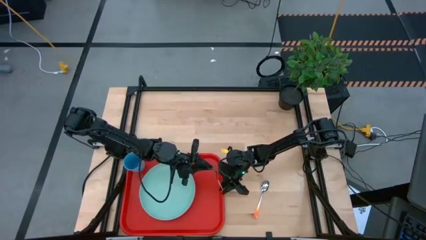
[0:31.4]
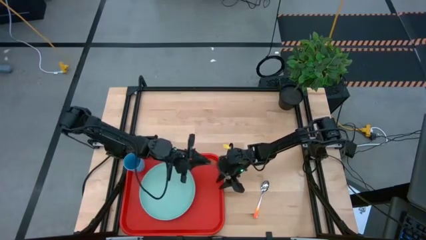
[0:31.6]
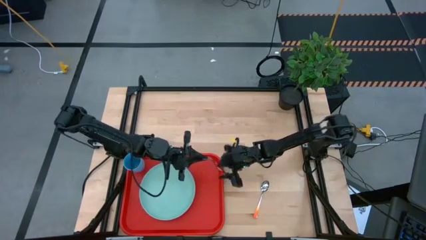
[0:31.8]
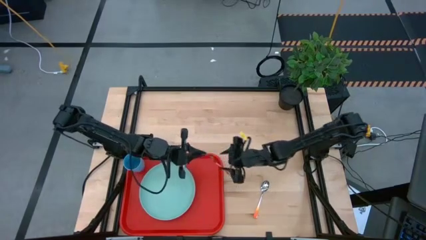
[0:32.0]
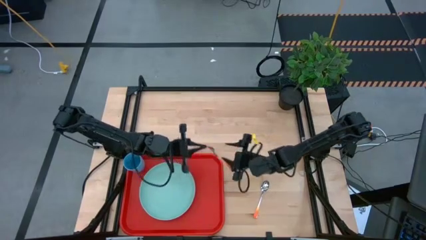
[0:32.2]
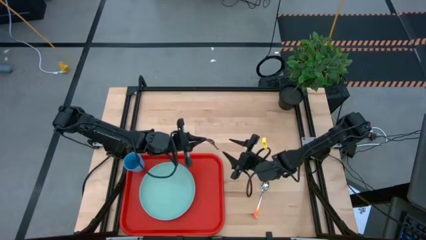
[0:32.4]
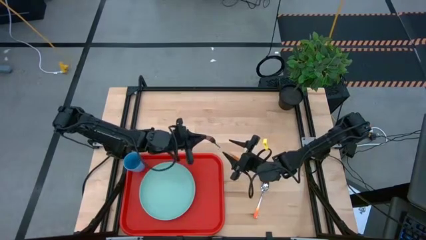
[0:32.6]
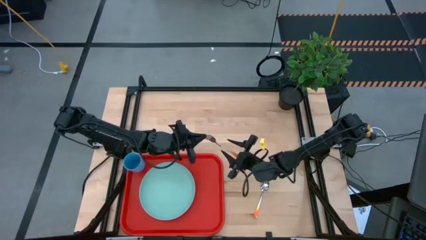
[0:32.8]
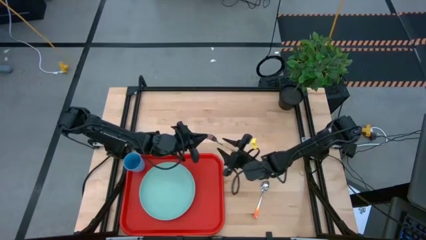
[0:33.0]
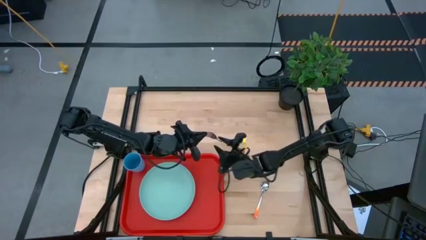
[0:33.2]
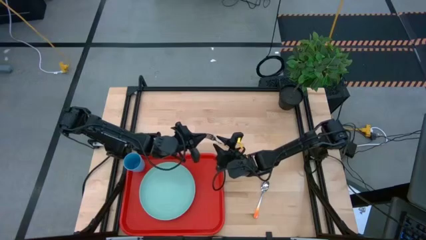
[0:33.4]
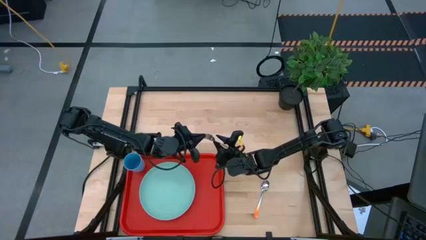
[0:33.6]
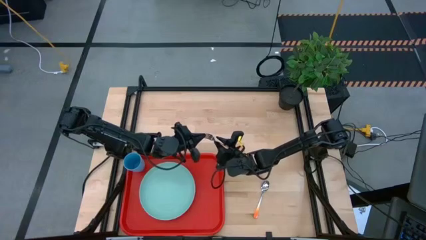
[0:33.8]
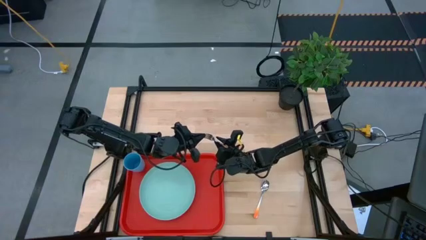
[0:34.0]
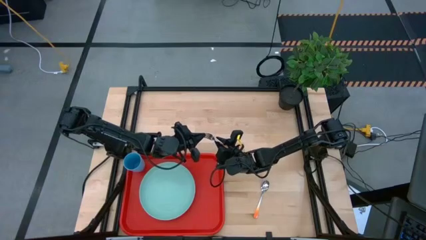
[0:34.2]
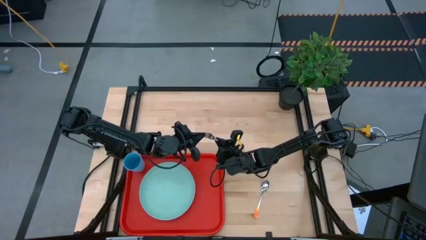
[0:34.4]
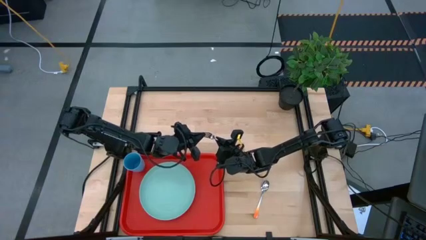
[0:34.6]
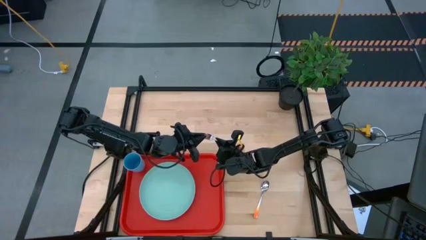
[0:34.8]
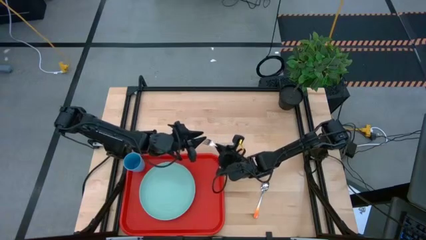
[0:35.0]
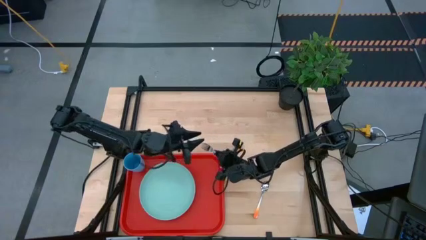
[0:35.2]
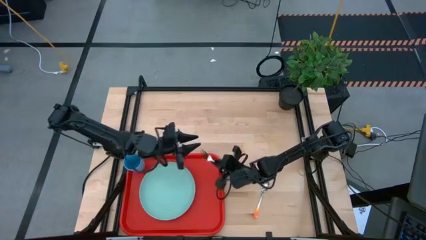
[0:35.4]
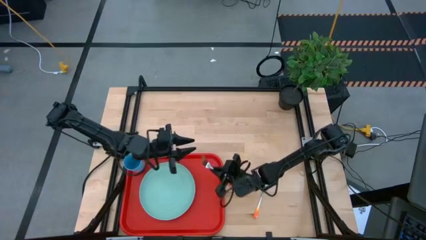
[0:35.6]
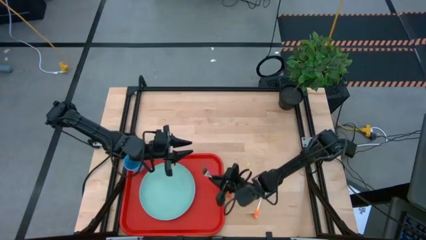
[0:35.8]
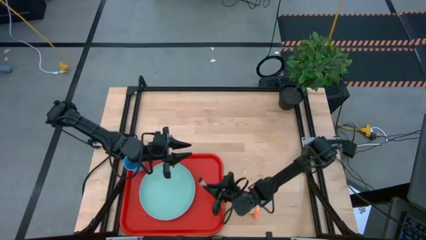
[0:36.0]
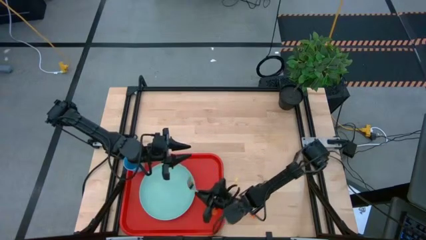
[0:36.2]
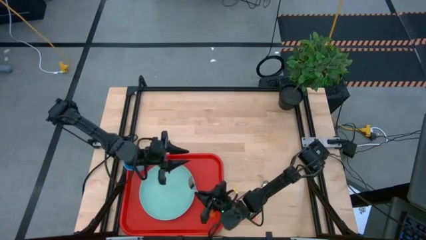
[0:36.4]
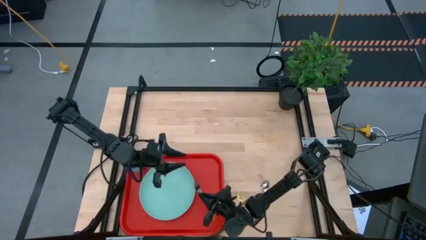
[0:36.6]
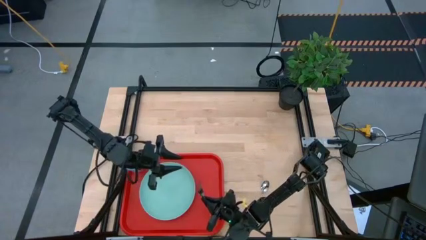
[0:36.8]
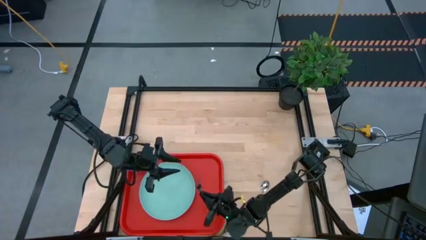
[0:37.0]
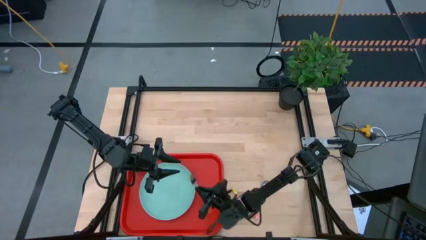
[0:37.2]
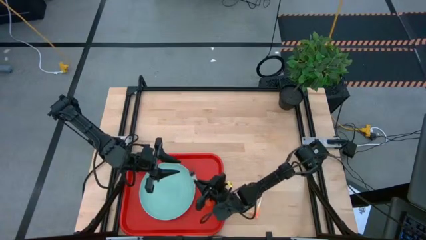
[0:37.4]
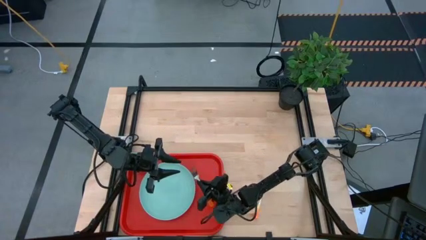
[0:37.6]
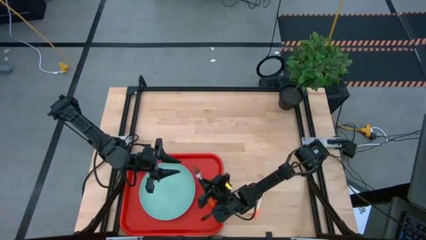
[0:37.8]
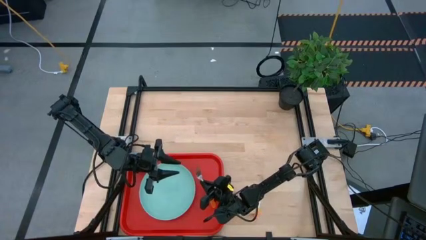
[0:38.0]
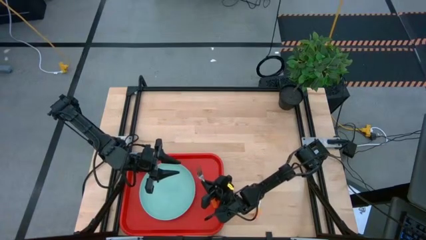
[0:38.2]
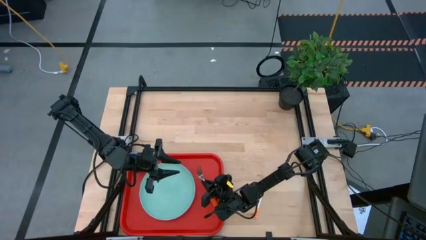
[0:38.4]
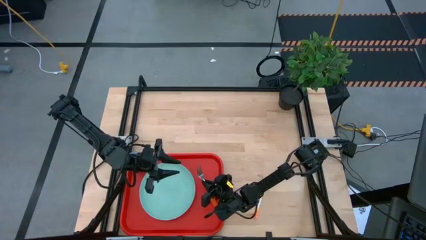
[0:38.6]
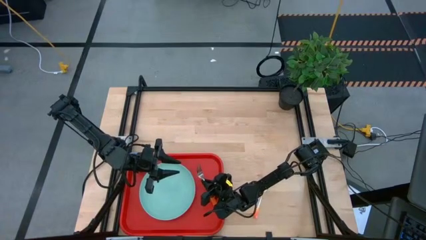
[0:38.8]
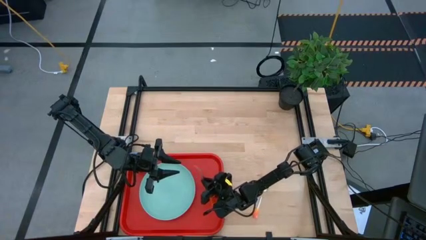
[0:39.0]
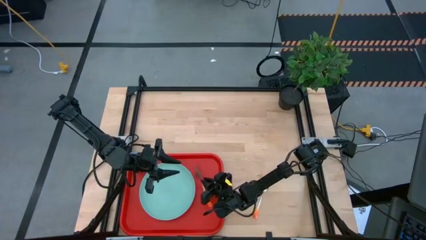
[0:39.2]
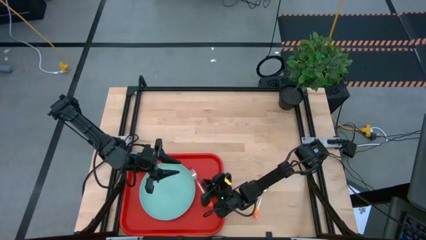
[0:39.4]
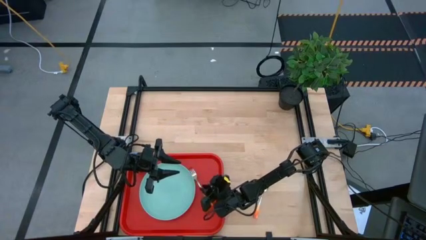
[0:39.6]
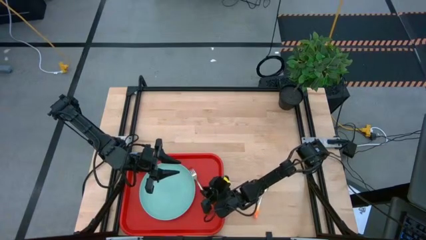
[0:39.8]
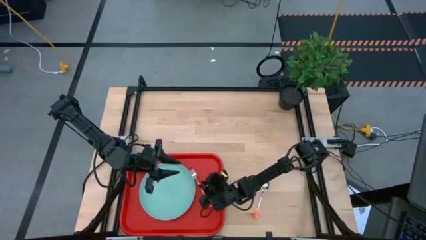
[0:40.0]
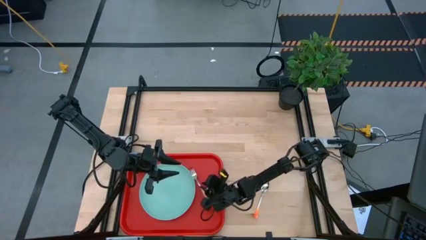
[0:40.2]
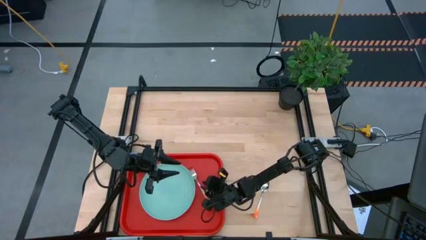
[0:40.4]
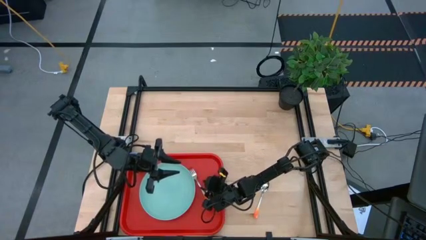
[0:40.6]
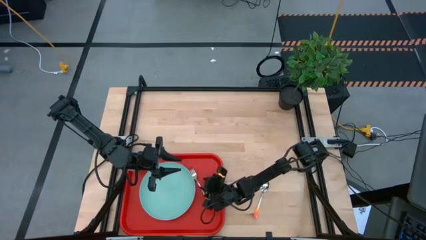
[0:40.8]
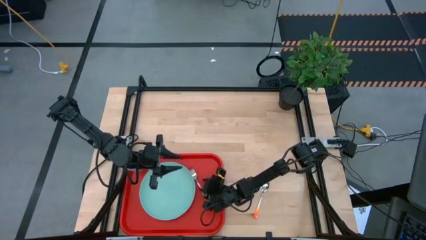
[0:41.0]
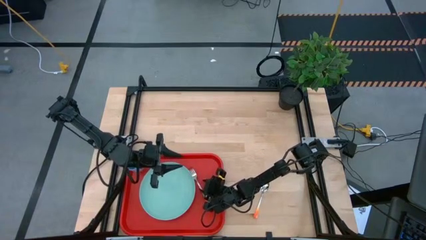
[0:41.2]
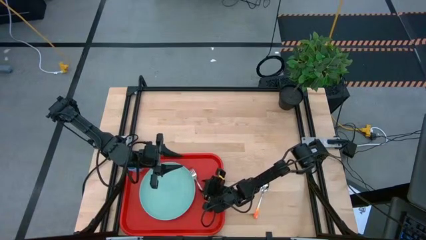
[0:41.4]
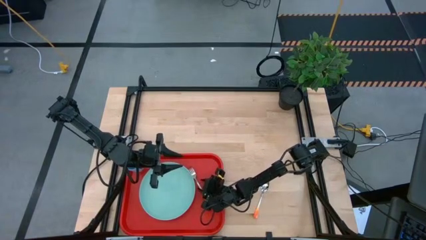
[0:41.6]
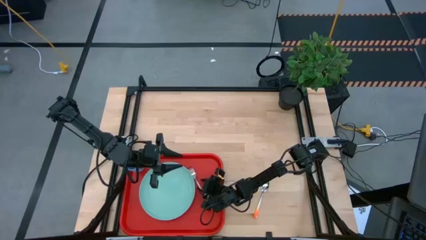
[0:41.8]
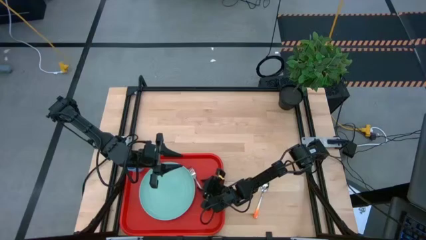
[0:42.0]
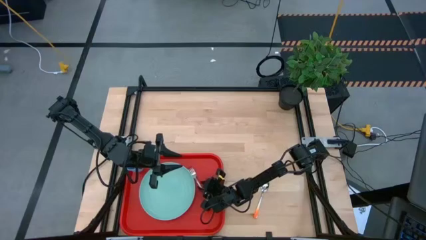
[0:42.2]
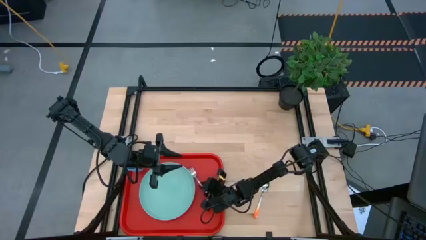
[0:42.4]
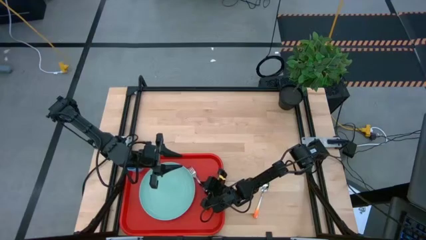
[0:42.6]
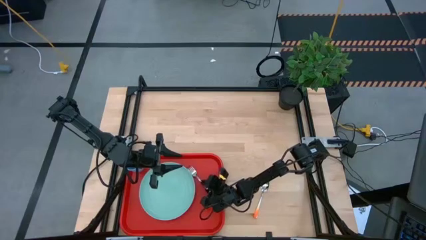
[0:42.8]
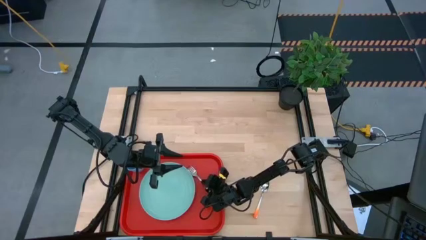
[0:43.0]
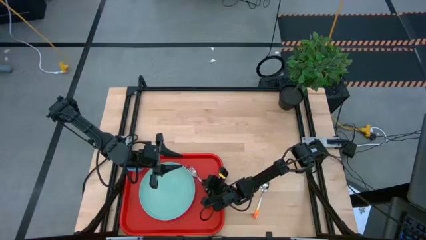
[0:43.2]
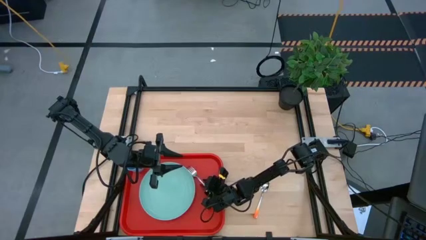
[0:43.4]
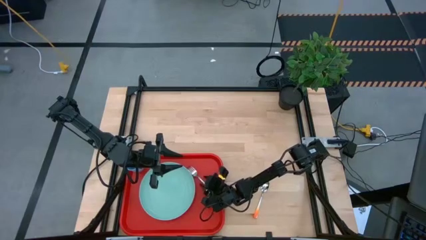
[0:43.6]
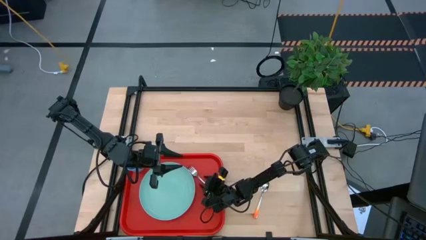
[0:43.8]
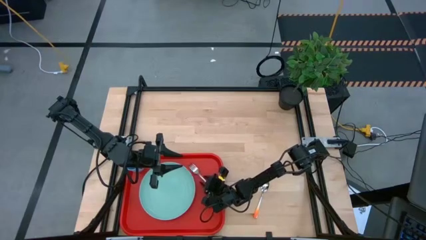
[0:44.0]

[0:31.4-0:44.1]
Task: Pick and place plate/cup/fork/spoon on tray
Put the orange fork on the tray

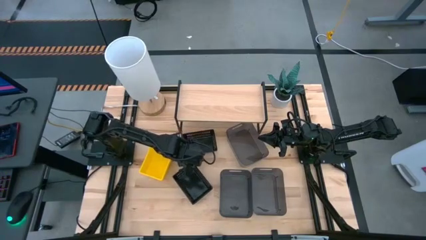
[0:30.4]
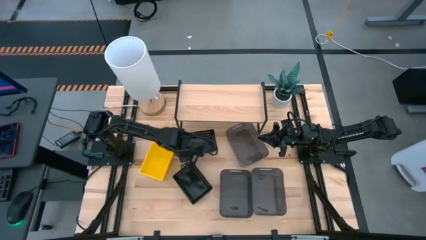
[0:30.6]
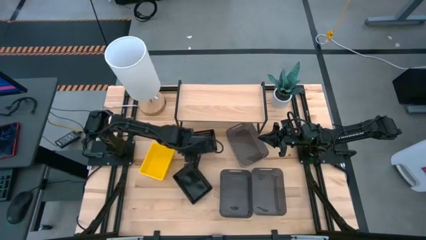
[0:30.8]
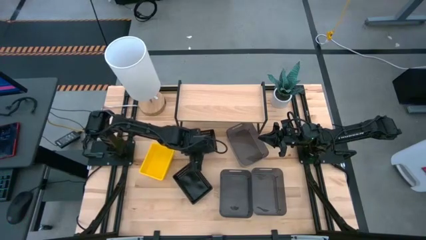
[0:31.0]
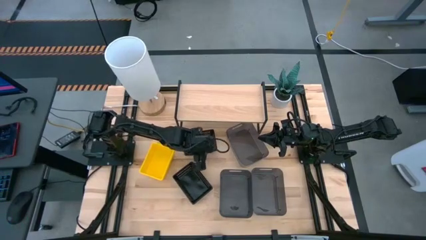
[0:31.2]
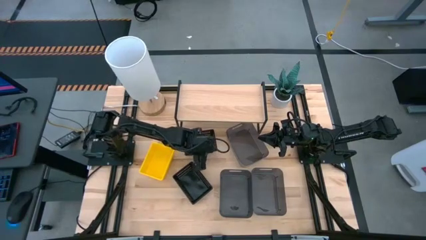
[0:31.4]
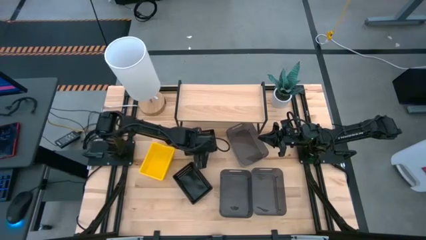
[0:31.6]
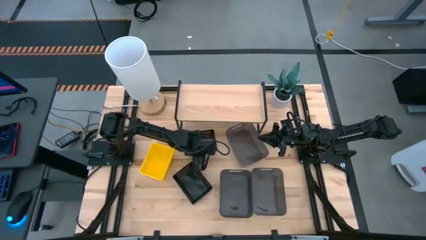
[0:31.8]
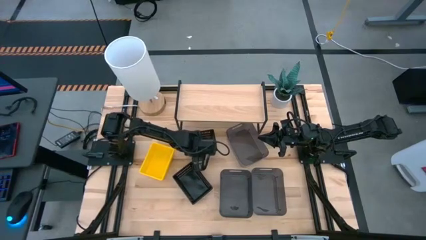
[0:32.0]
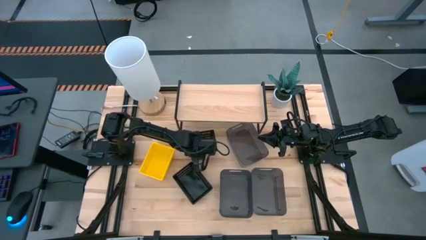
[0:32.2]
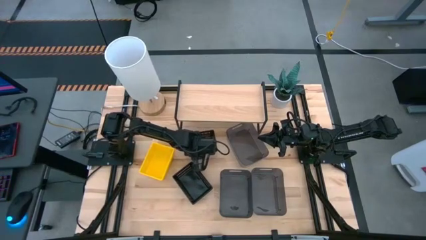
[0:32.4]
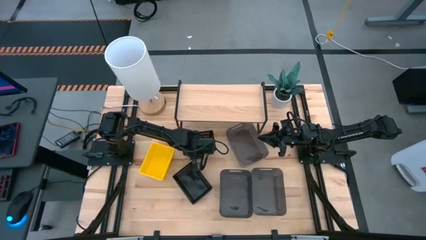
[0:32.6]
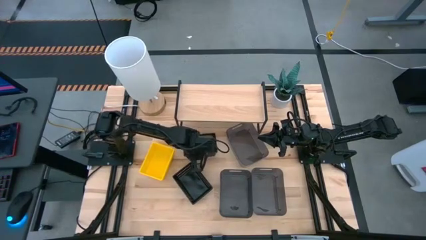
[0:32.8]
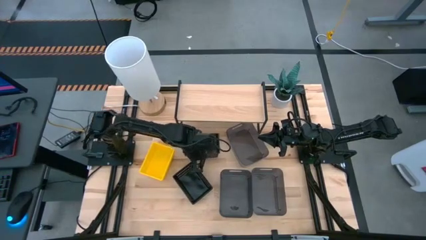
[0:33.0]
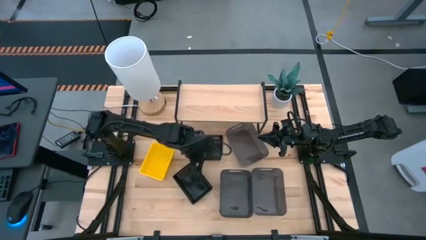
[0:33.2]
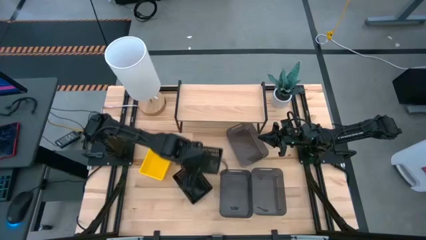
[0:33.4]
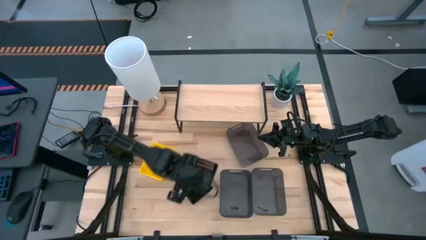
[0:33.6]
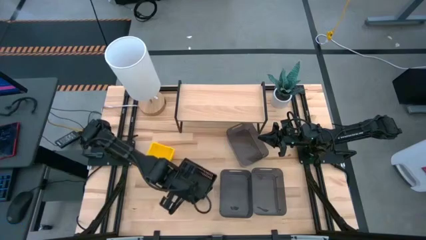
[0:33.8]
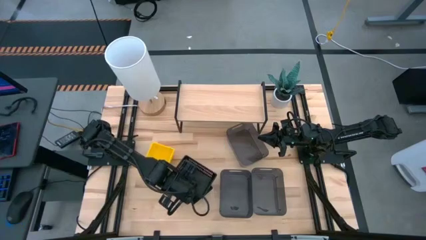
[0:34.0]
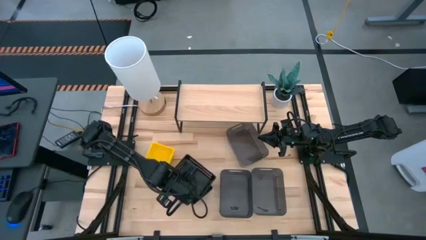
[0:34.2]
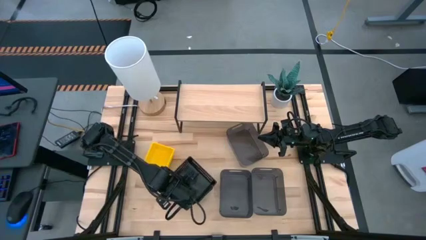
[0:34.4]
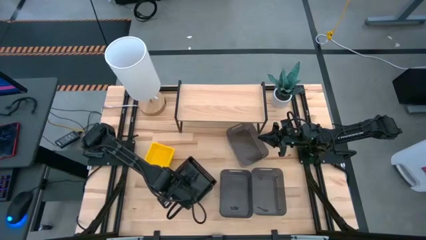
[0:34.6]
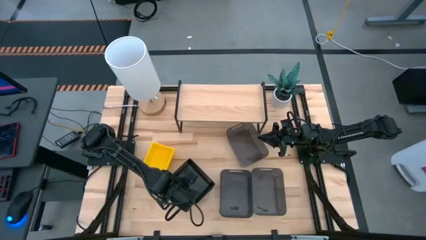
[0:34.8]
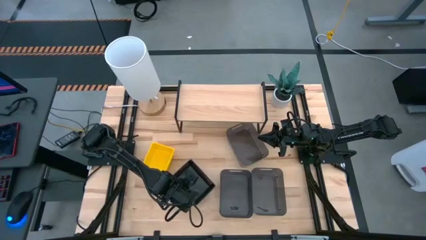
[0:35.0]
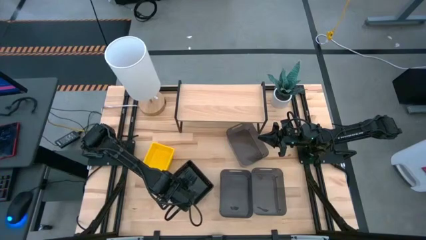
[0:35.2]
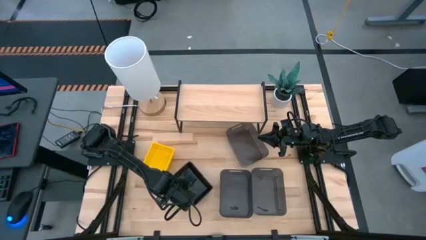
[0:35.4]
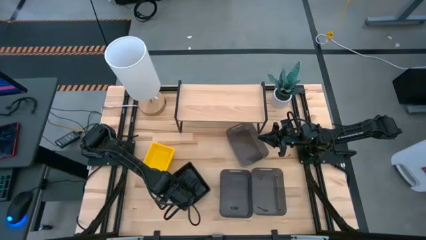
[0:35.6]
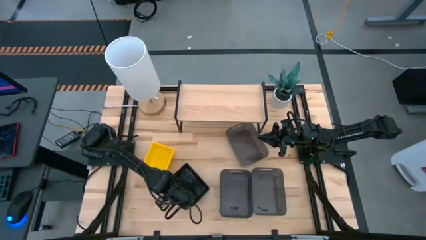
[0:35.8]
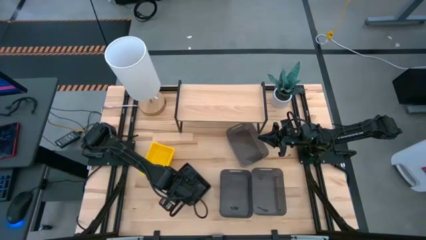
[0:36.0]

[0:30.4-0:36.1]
Task: Stack baskets on shelf by color
Stack the top black bin on the black bin on the table
